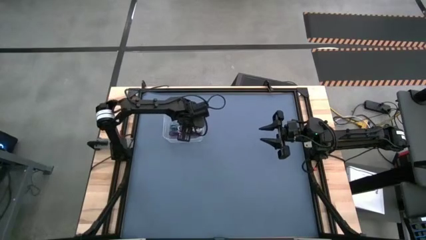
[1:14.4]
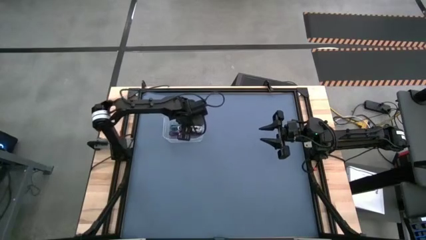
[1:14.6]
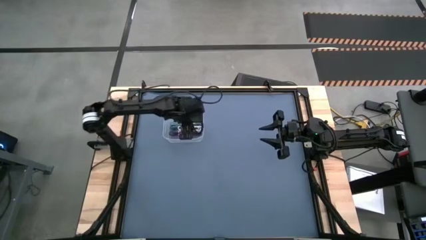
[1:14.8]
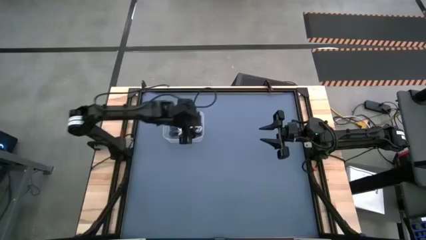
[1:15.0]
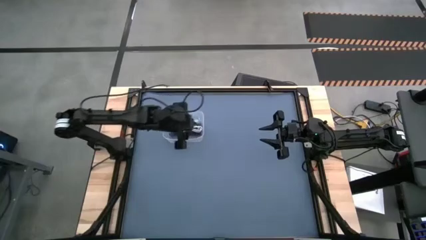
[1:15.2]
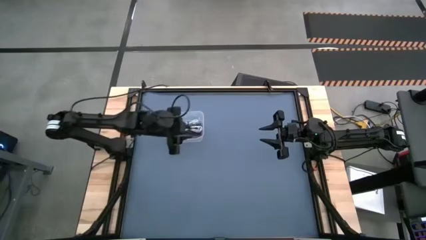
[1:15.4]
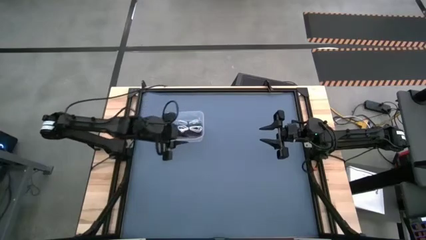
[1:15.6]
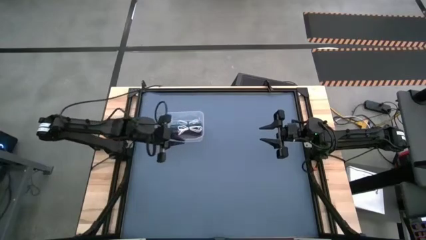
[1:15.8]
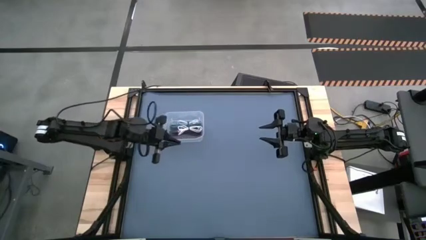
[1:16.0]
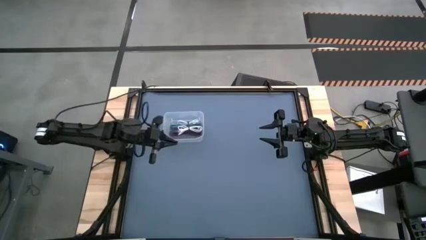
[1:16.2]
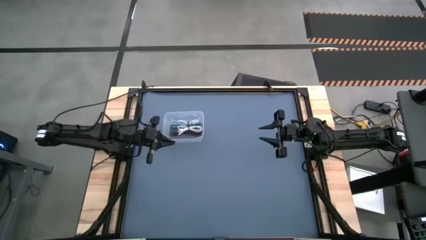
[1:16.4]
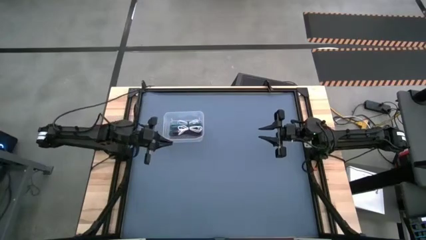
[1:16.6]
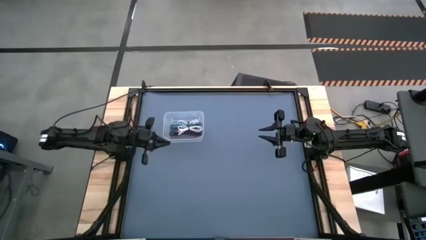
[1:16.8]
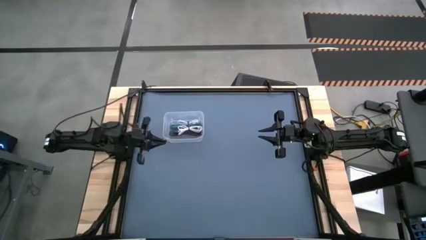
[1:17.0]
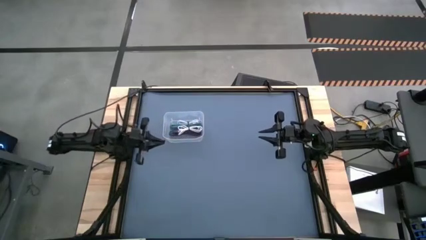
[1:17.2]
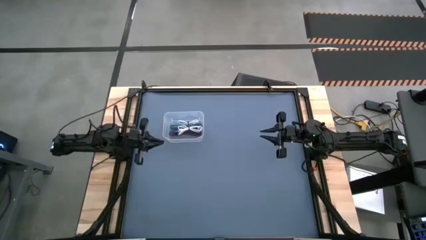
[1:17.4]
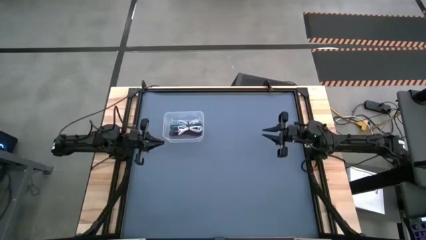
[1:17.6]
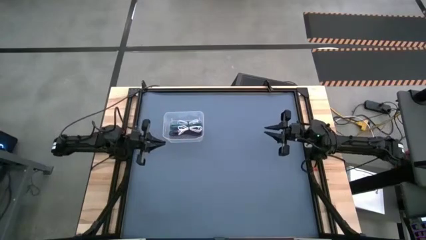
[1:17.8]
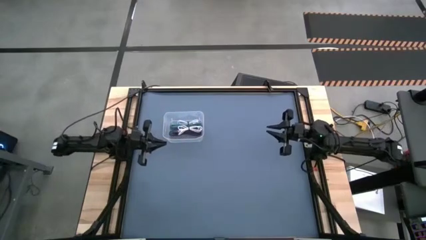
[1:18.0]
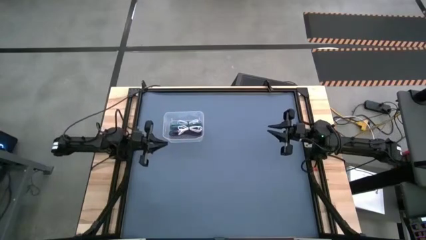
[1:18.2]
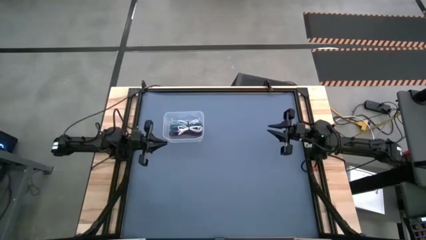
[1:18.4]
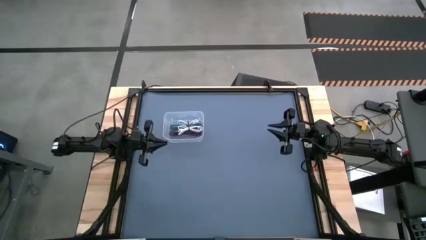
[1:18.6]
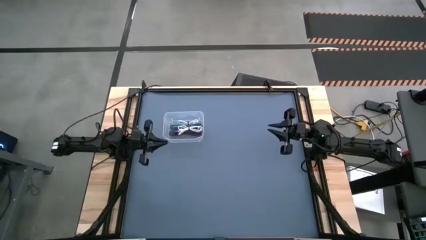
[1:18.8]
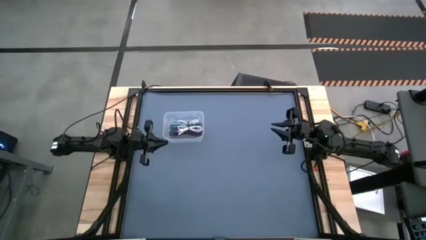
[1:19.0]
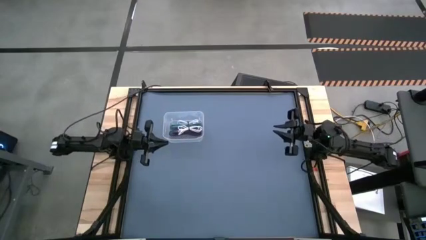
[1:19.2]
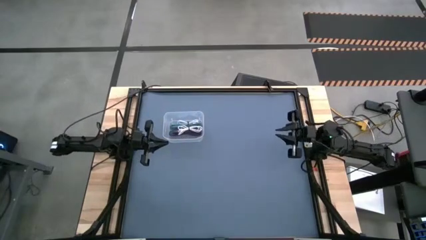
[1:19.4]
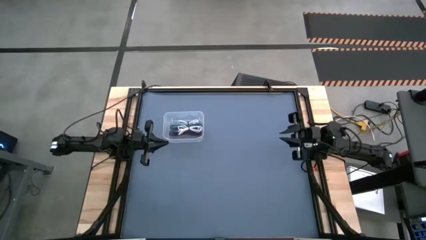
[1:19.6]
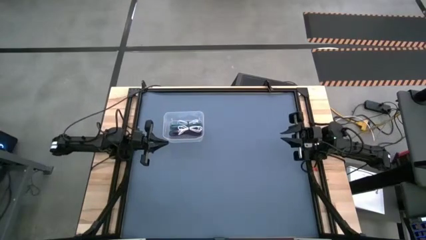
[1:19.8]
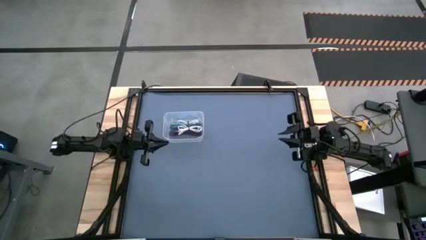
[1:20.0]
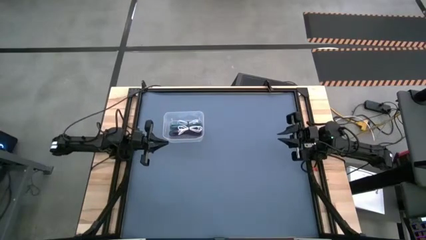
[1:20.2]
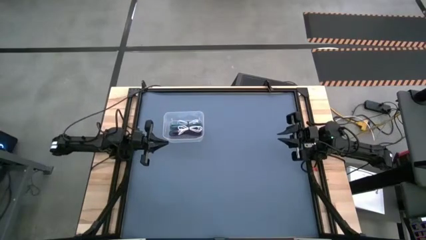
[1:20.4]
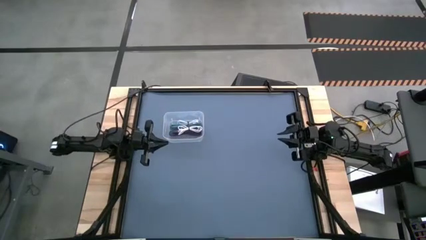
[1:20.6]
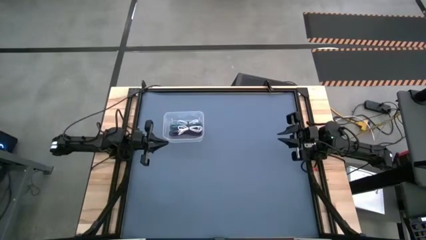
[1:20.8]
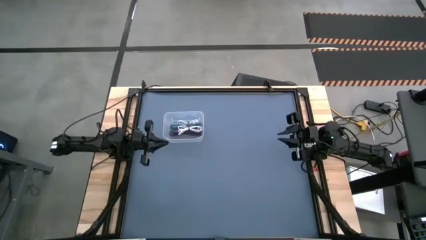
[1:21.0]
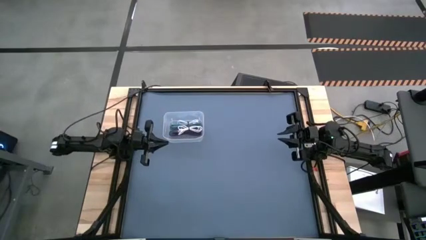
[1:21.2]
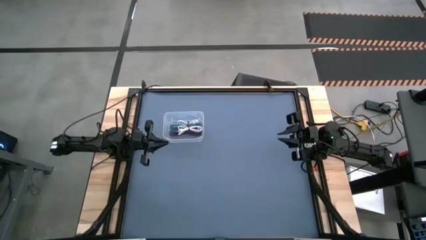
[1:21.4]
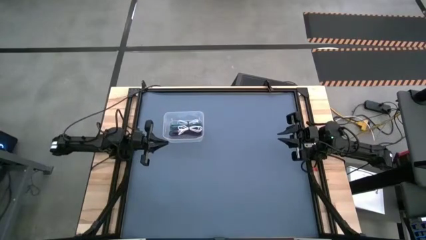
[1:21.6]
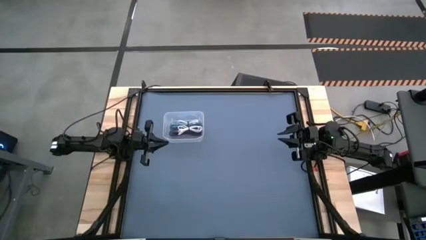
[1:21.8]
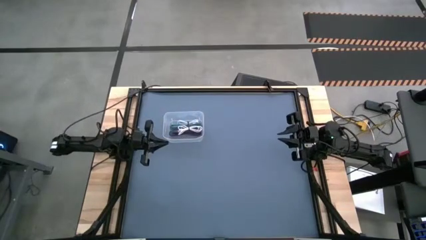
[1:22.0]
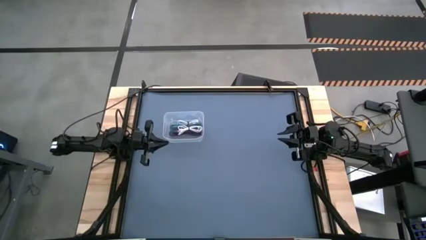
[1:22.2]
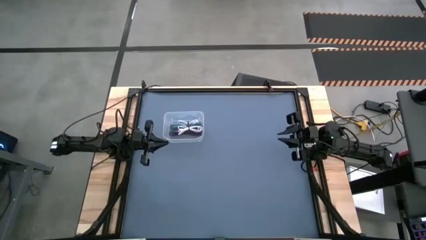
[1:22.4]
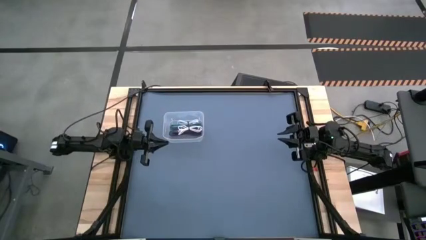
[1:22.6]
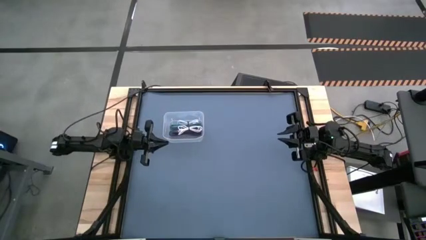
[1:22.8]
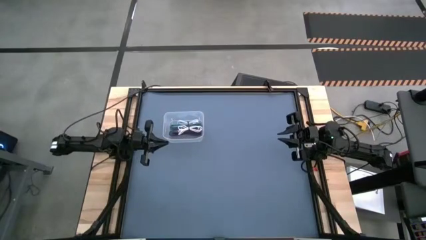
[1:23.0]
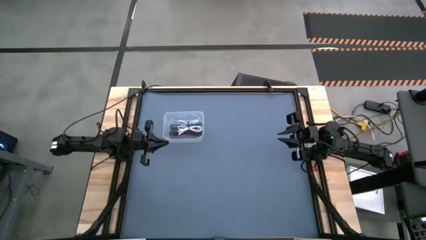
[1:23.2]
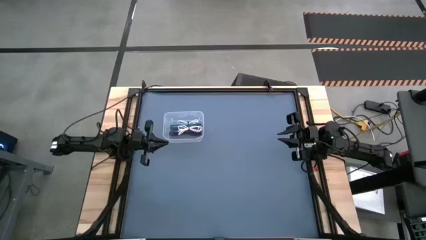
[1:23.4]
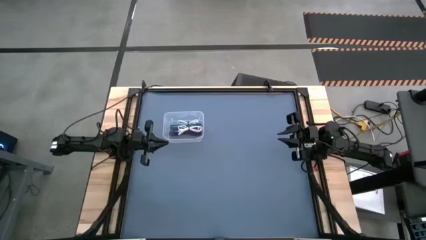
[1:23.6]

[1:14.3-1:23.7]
Task: Pick and place USB-C Cables
Return to Home Position

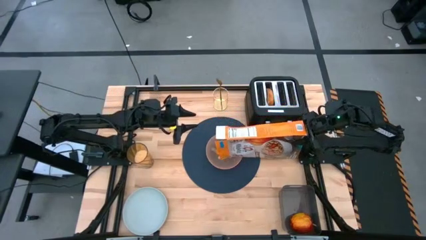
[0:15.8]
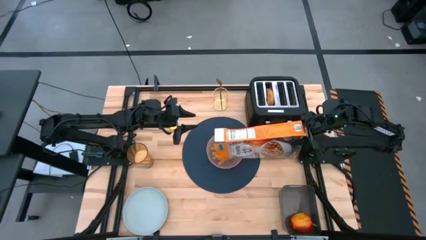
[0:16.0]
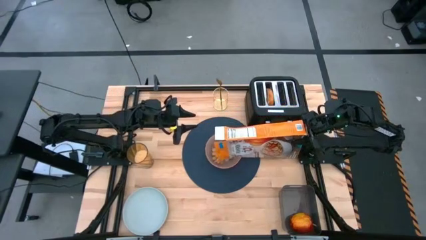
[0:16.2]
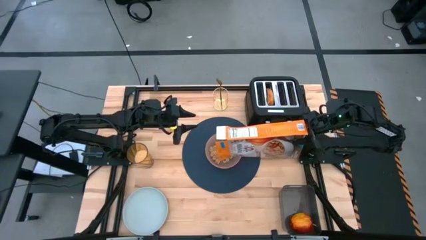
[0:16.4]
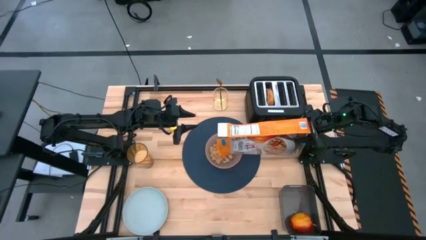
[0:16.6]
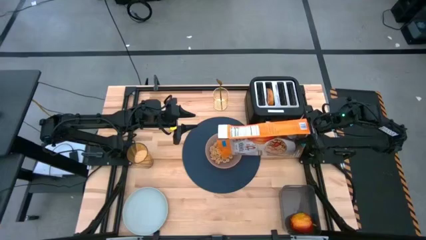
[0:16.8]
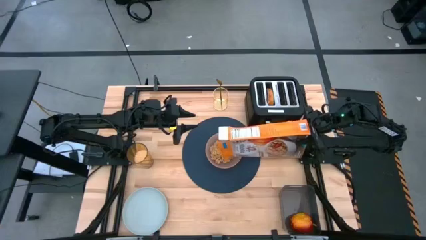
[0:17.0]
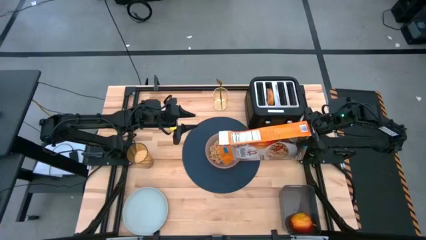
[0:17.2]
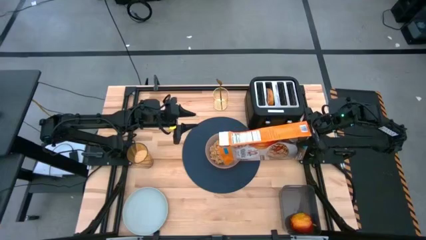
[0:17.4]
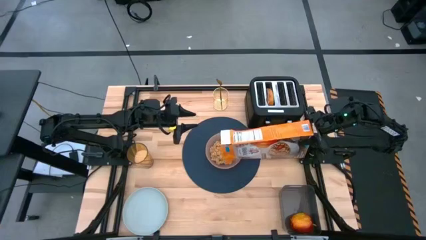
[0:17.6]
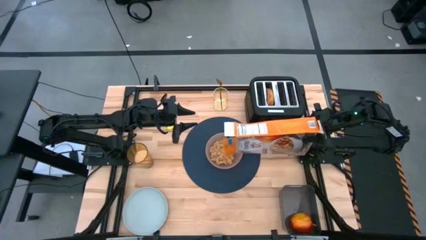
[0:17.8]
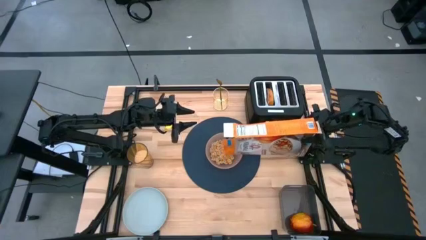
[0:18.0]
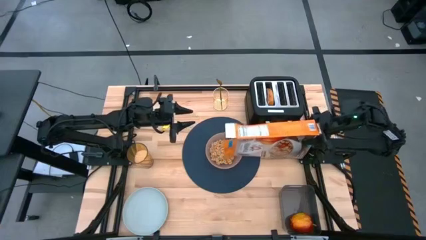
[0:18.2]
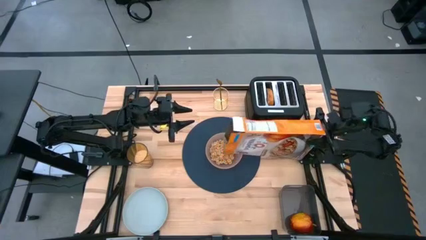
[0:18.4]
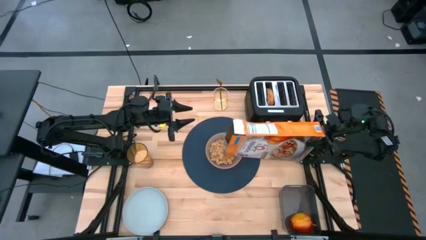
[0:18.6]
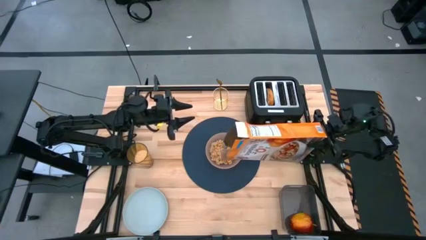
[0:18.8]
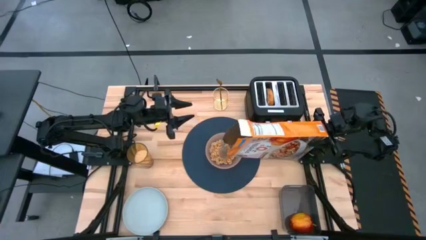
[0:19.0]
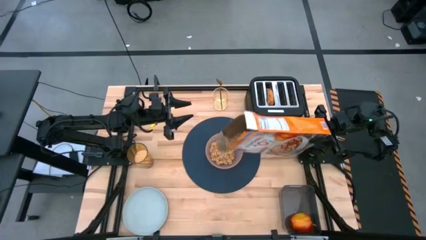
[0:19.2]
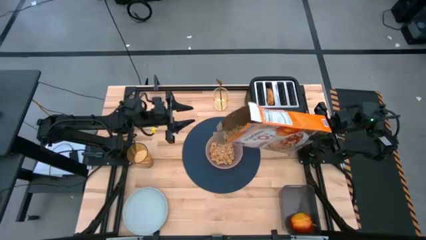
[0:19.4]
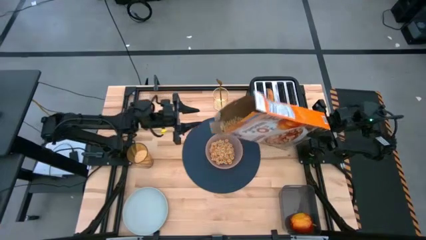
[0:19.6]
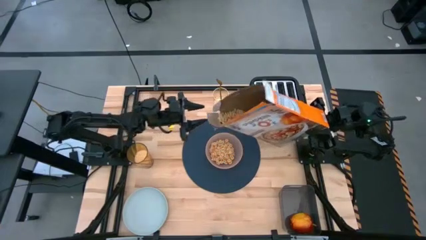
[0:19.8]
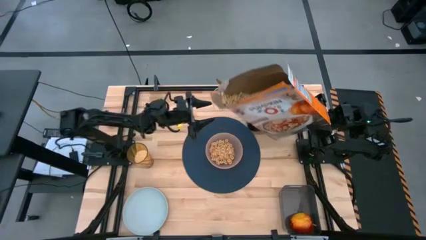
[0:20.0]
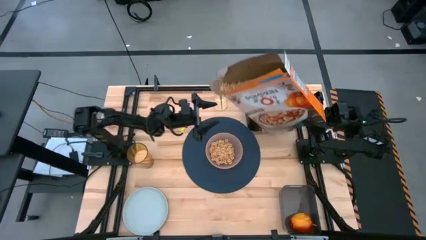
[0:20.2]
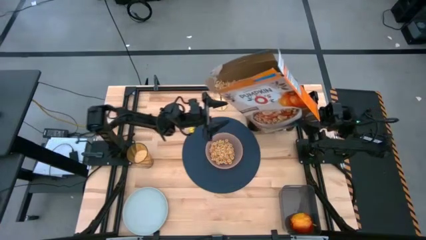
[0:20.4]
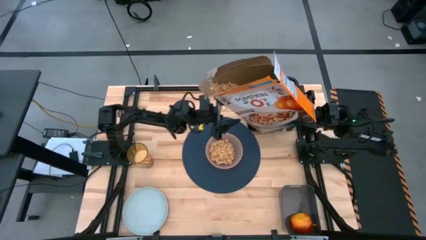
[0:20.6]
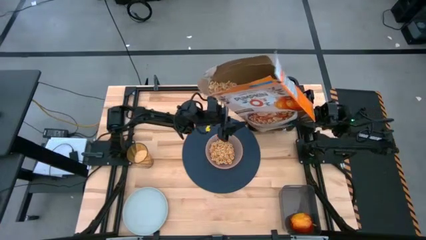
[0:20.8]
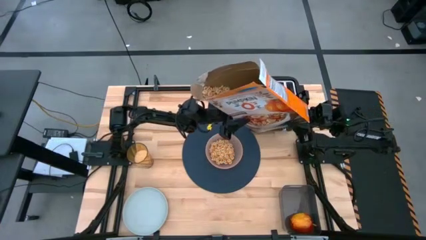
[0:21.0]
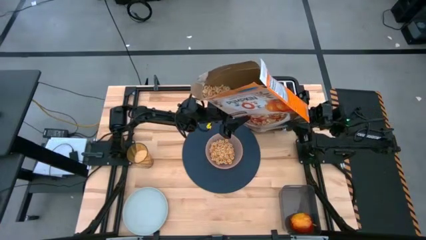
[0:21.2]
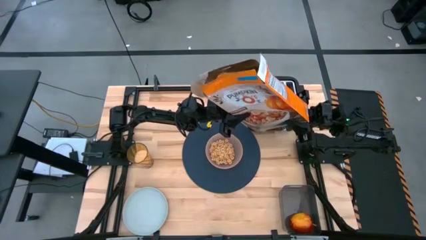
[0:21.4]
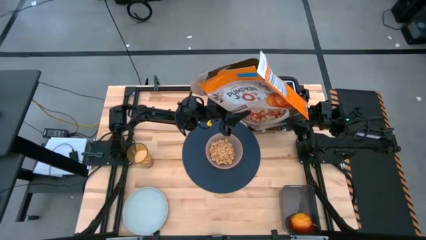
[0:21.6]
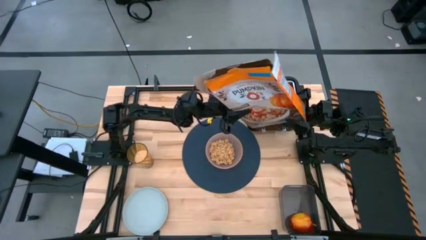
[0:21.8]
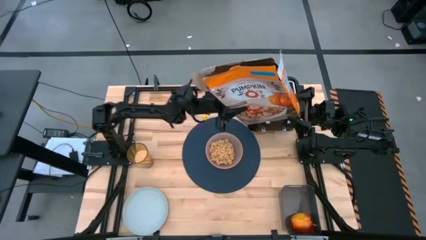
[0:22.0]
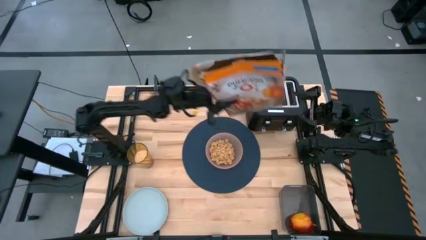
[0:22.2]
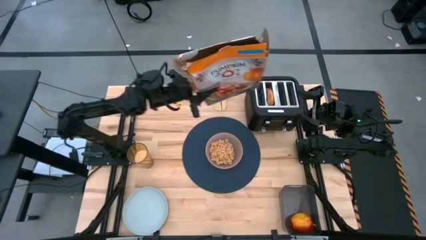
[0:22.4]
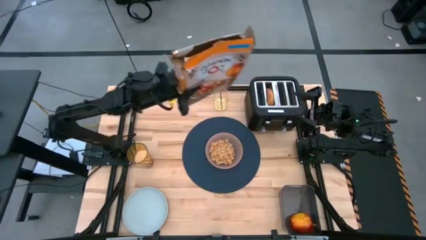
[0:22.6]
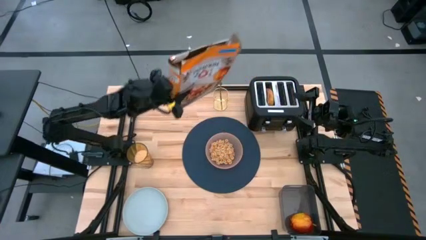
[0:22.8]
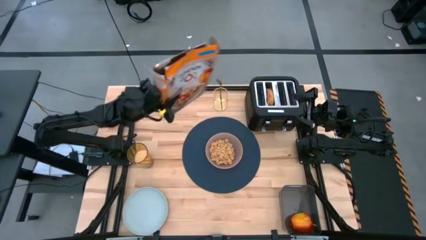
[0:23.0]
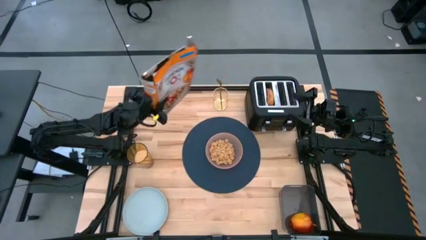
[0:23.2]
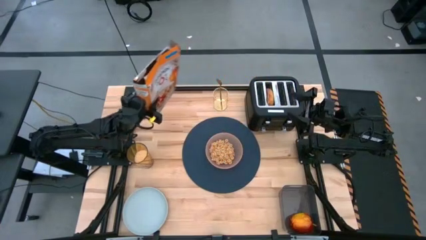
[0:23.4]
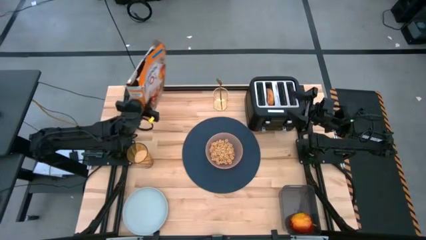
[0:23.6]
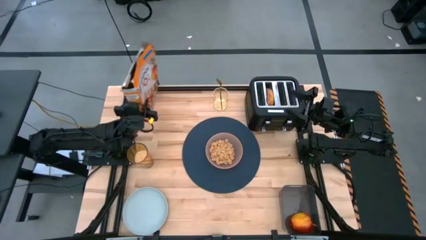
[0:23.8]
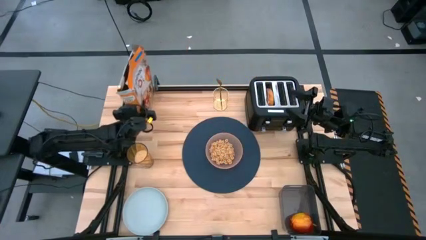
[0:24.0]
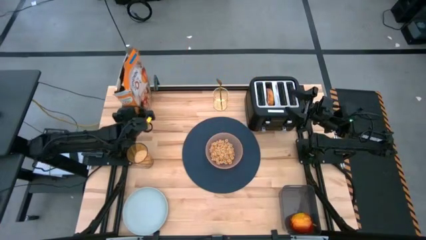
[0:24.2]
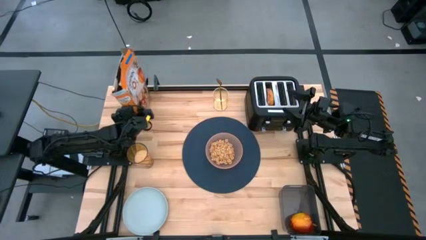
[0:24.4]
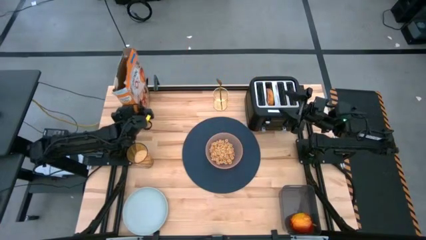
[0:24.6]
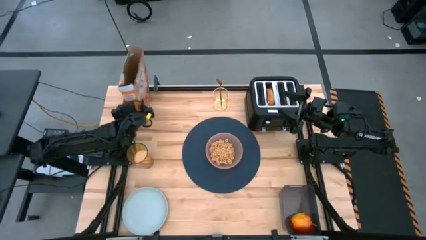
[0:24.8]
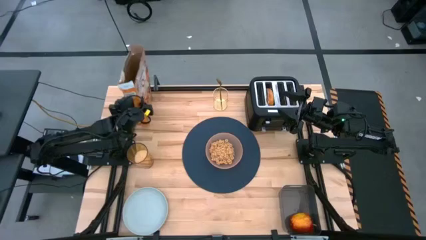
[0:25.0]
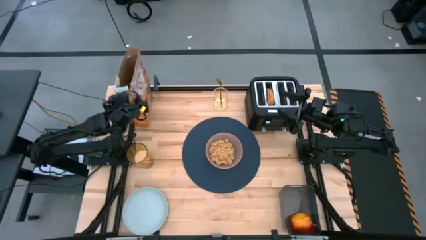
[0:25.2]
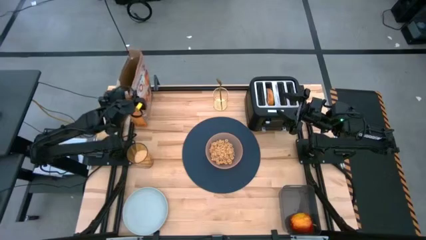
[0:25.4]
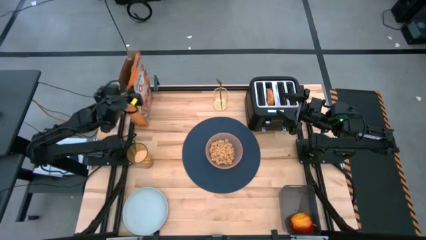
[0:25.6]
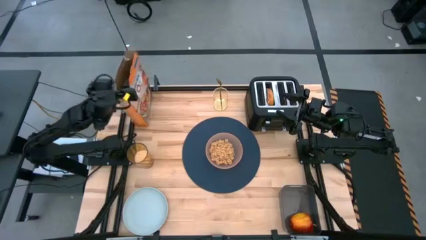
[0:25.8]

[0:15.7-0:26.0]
Task: Arrange a breakfast setting
Pour the cereal from the cereal box into the pink bowl
